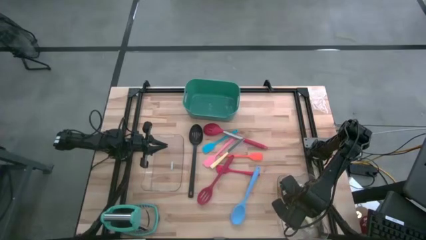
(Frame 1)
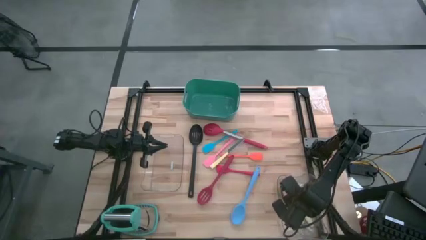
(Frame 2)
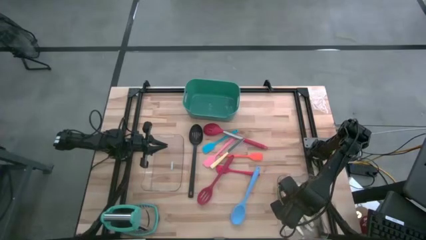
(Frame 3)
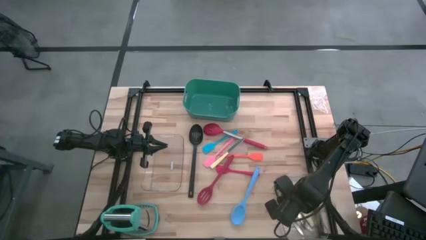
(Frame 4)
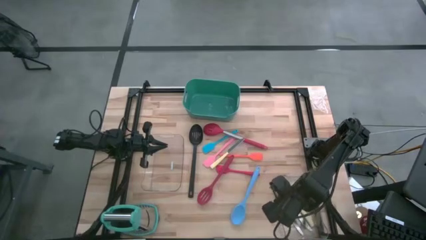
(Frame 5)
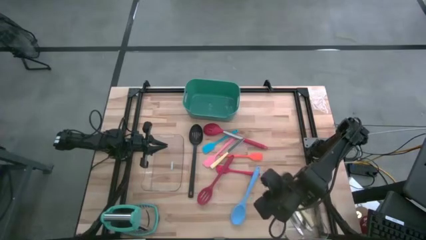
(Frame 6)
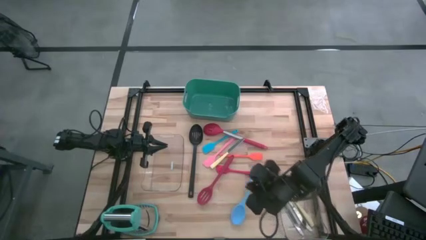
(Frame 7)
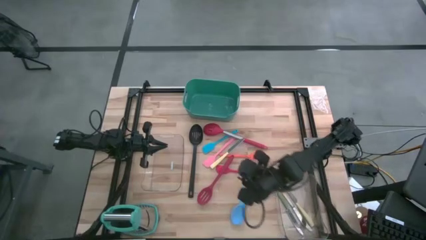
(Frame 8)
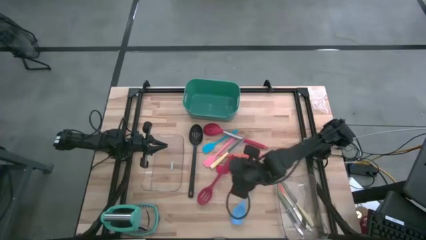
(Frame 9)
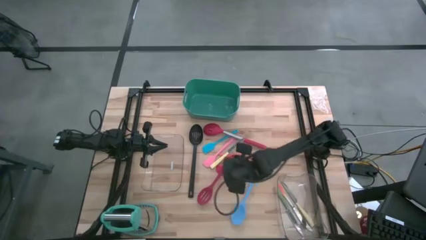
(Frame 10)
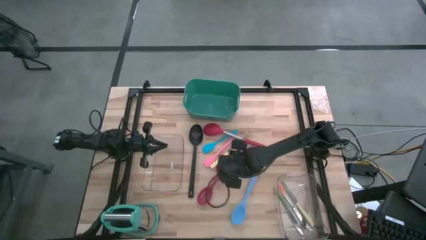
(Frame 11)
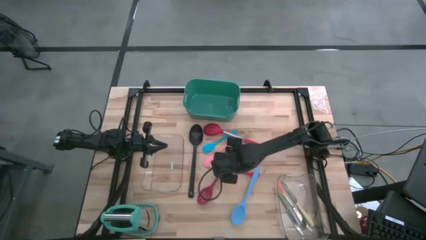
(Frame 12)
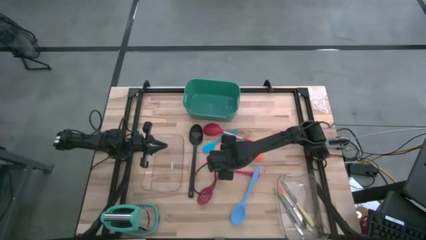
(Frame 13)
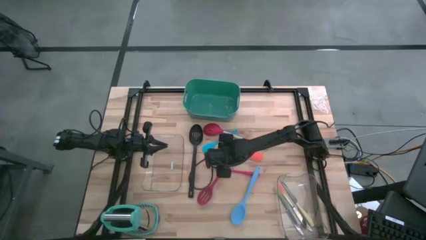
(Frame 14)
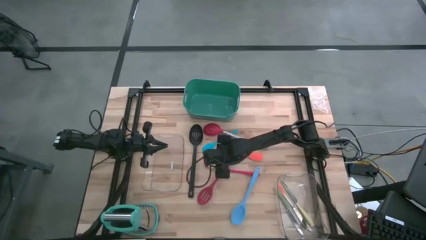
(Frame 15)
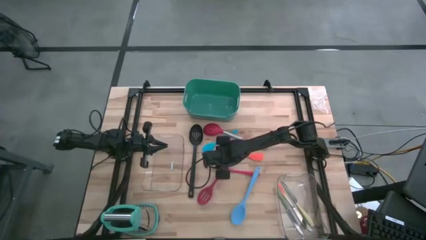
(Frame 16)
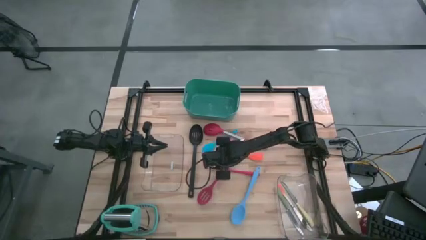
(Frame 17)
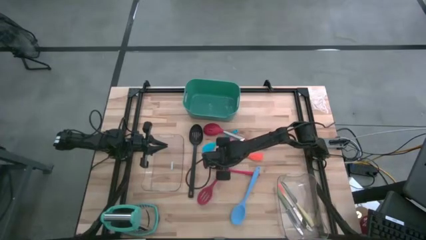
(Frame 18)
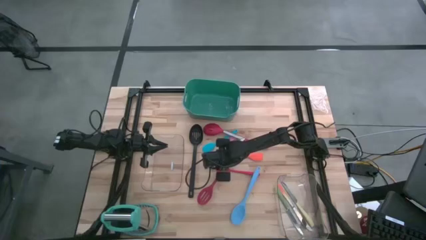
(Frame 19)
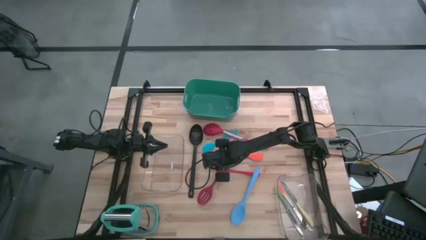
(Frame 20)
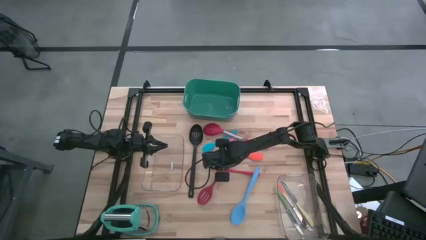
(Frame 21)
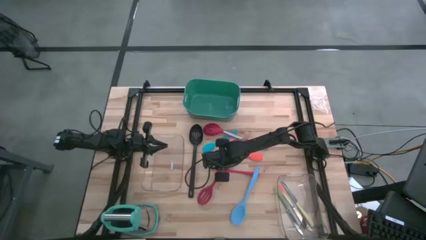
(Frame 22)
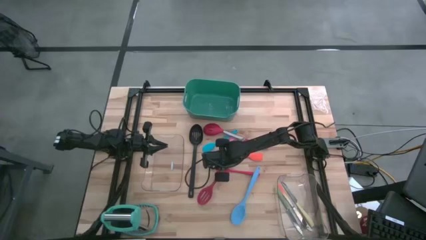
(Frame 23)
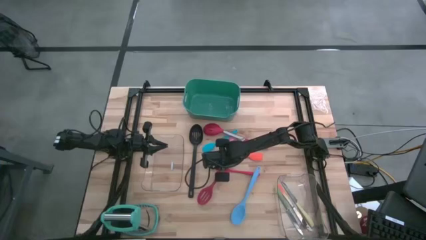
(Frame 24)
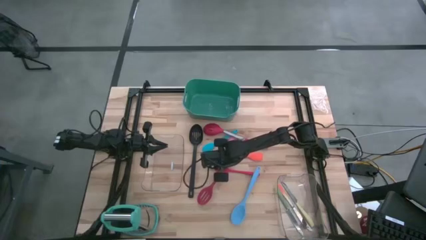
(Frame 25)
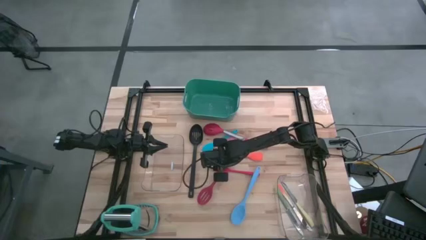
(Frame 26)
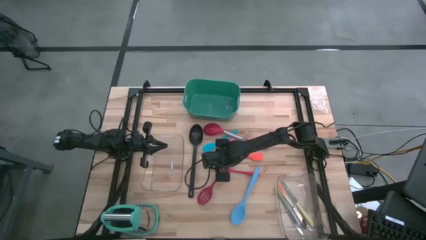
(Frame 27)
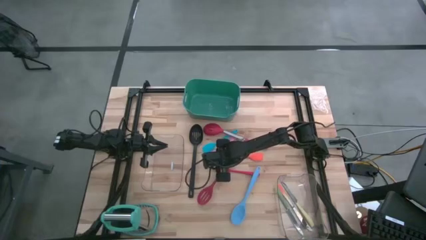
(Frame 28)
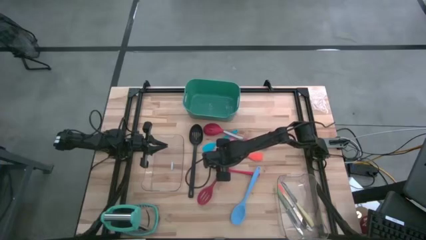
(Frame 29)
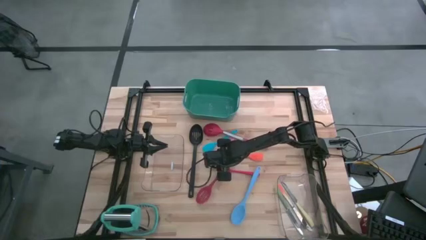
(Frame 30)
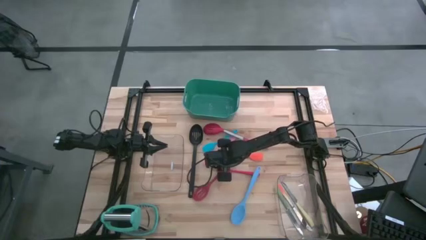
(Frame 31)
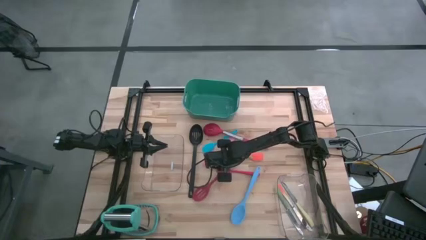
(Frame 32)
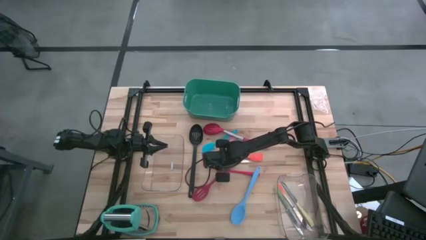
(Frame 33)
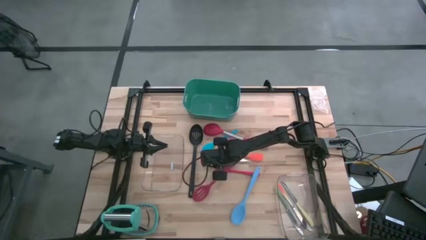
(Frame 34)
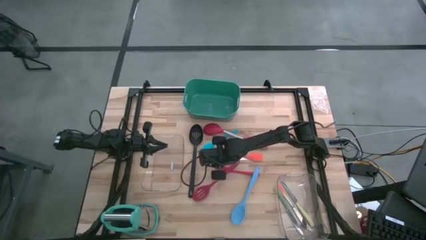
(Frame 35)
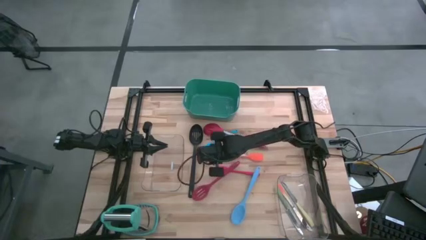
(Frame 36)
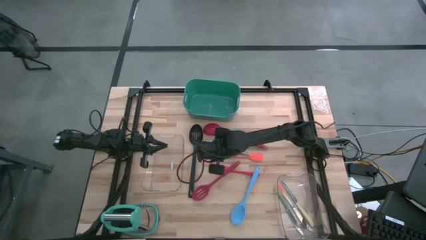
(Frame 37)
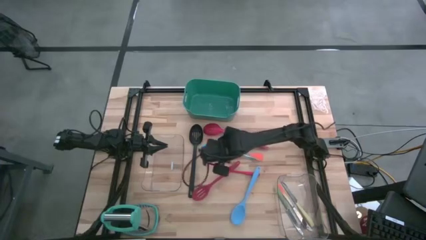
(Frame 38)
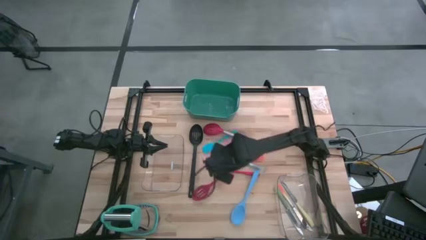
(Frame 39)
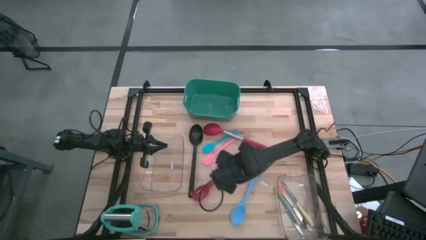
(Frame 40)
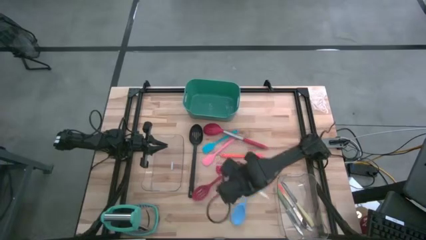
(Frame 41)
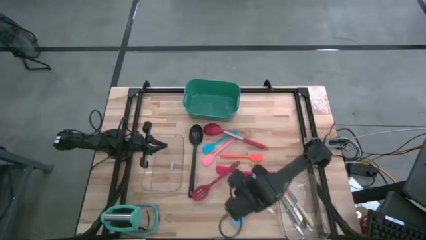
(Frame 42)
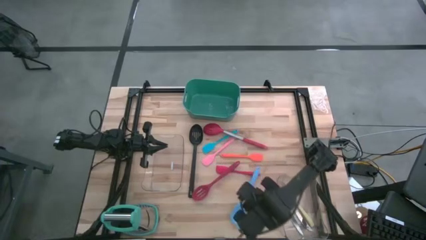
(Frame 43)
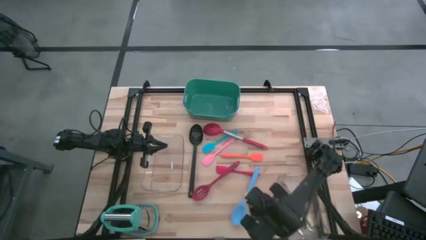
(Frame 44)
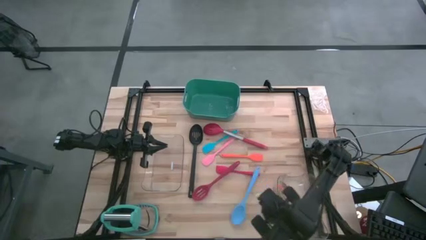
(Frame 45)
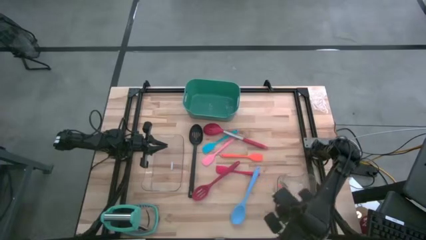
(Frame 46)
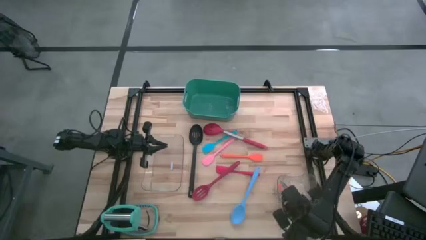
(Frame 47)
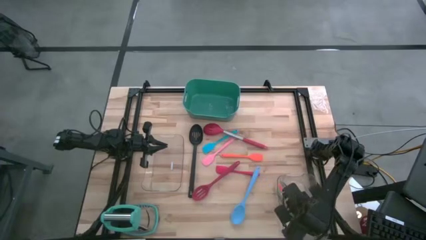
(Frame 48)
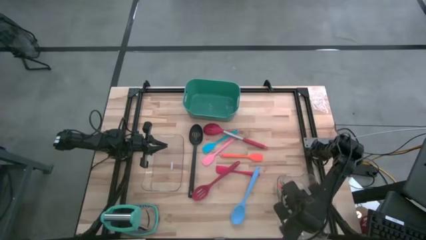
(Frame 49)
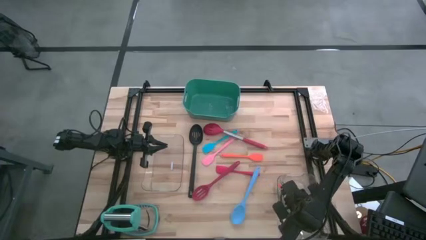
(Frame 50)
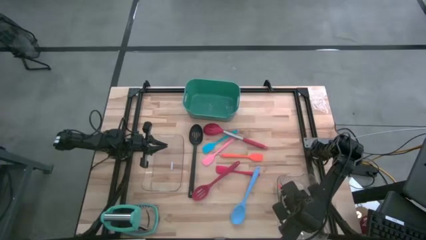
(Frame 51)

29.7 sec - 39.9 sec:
Task: Pick & Place Kitchen Items
Put the yellow knife into the right transparent bin

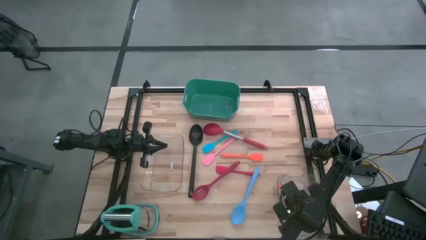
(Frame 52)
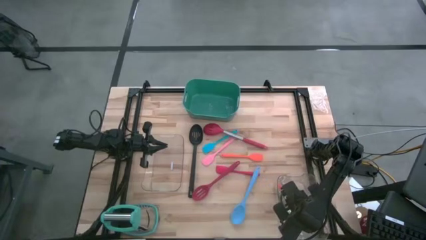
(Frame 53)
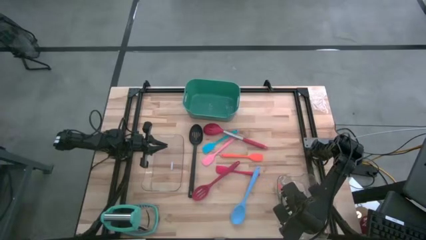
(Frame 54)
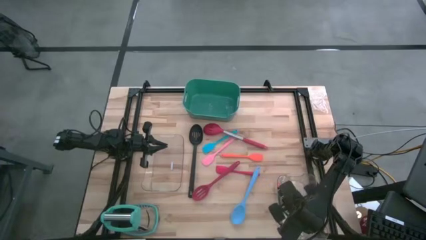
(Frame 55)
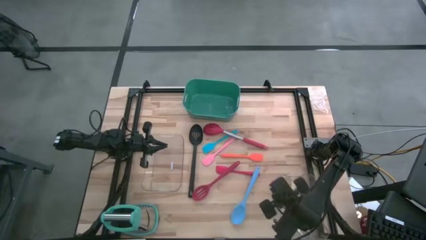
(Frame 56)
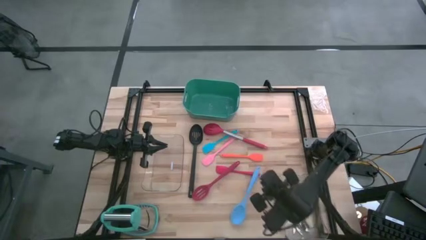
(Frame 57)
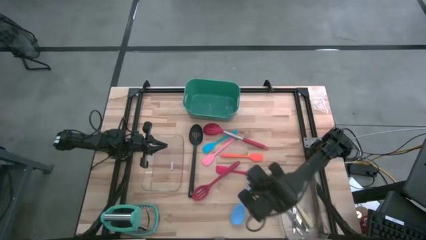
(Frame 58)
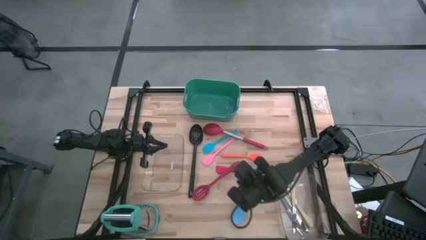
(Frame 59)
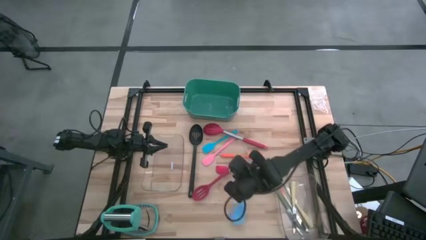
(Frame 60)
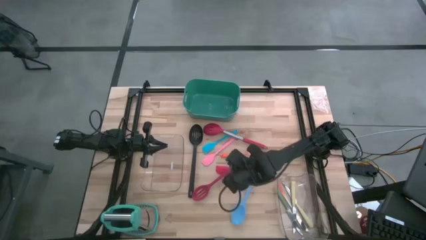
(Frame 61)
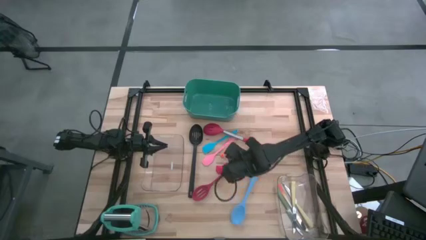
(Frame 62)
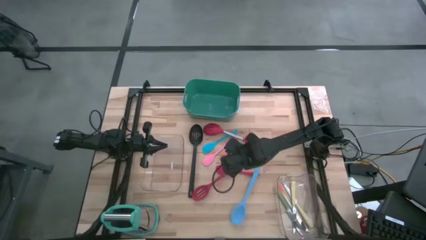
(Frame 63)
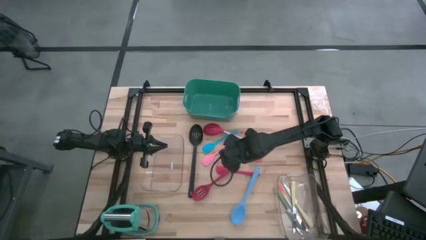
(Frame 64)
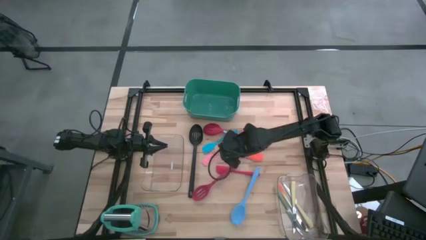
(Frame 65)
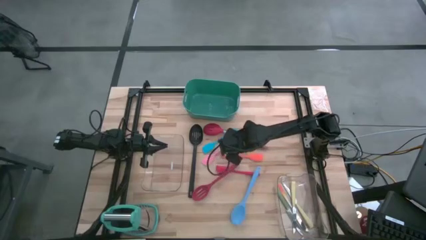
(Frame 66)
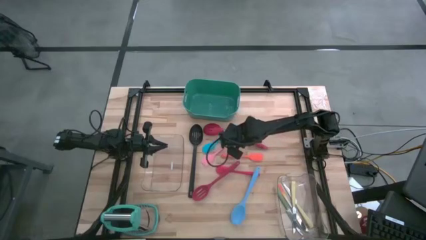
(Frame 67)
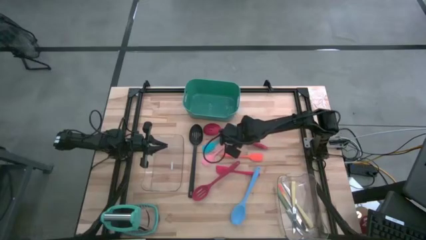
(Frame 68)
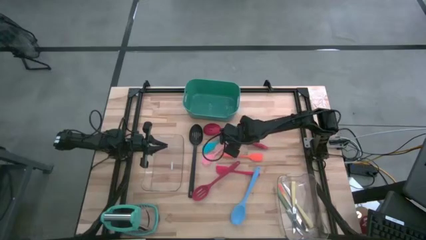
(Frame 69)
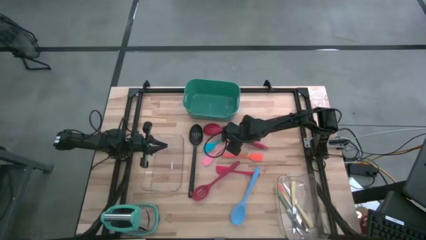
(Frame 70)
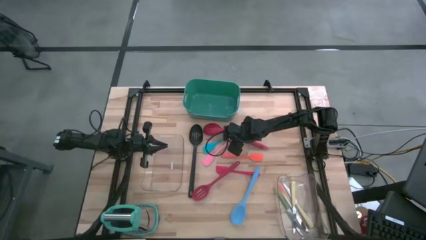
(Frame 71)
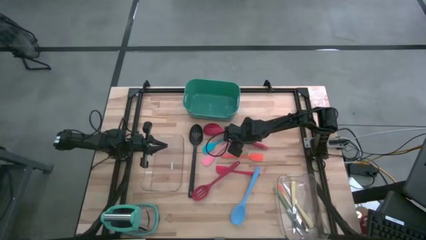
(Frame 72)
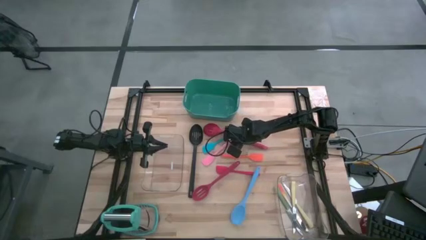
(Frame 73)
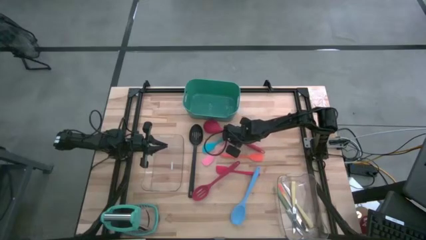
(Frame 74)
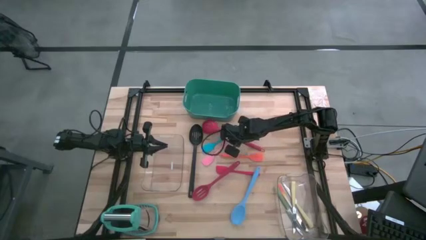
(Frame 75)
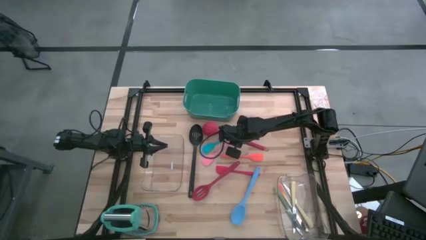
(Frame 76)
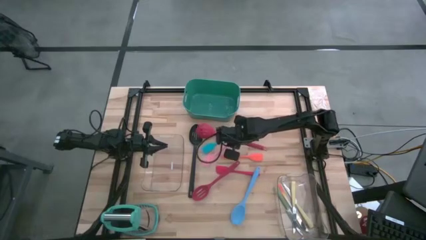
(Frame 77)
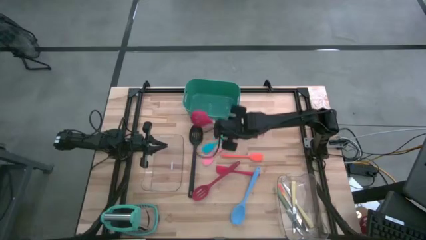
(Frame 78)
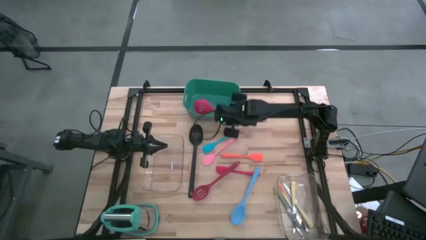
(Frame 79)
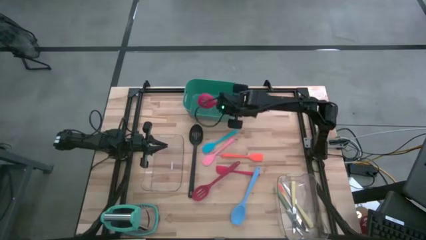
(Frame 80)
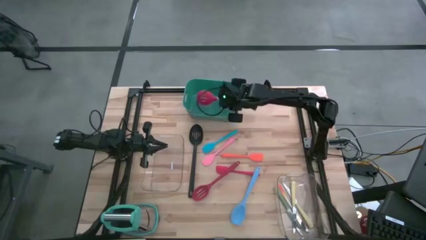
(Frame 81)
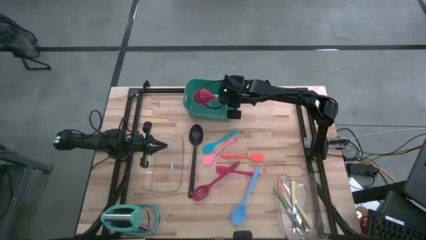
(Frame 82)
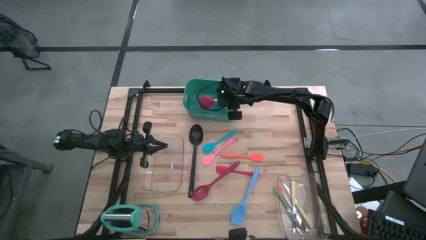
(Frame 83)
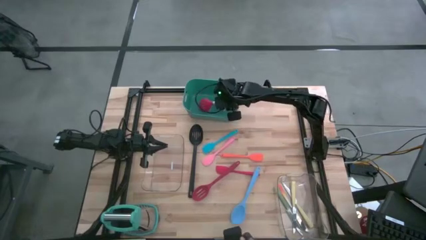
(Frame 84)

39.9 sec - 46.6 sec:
Put the red slotted spoon into the green bin
